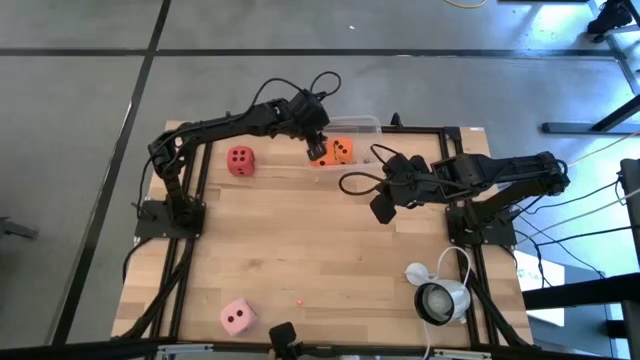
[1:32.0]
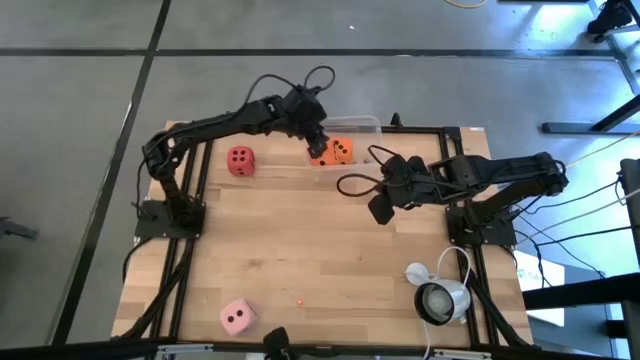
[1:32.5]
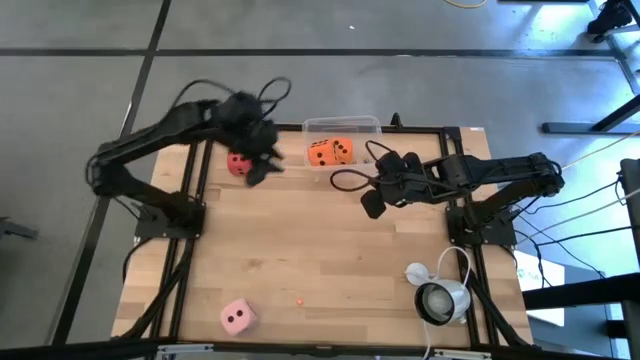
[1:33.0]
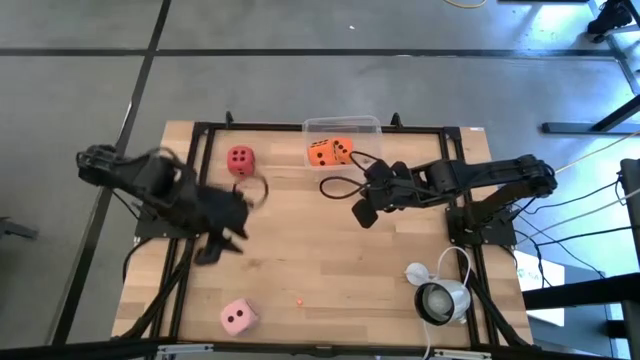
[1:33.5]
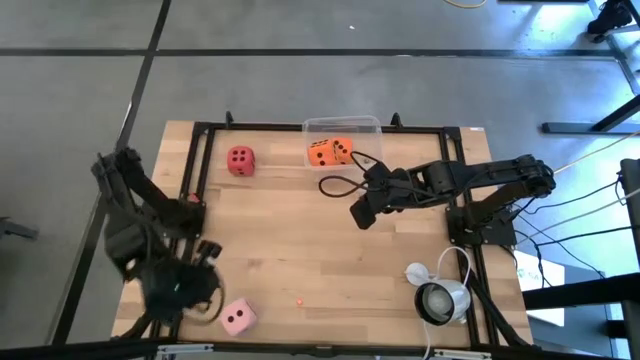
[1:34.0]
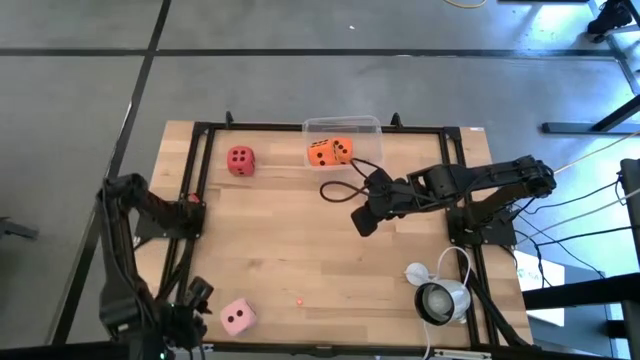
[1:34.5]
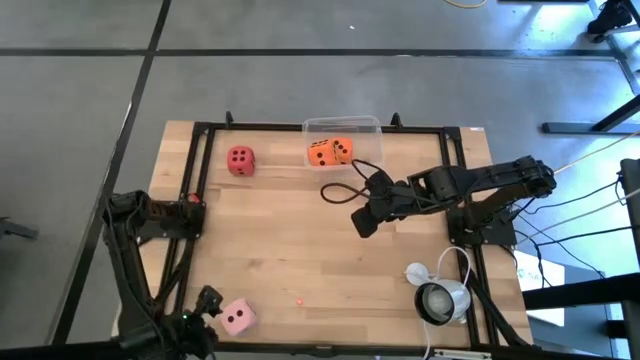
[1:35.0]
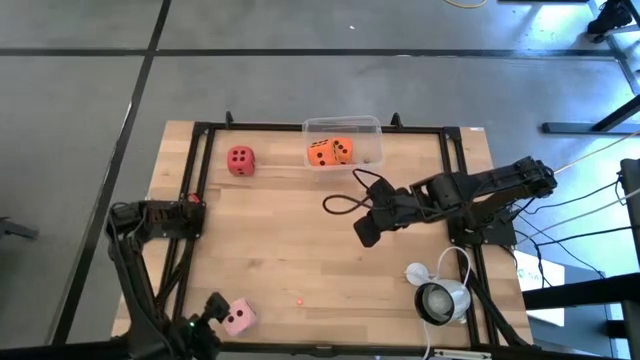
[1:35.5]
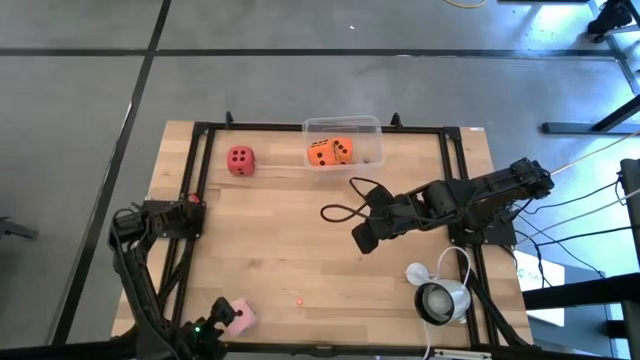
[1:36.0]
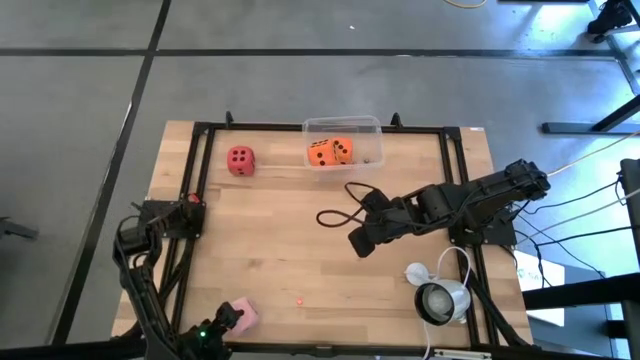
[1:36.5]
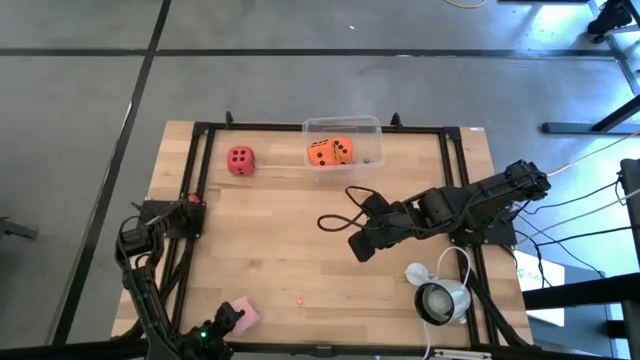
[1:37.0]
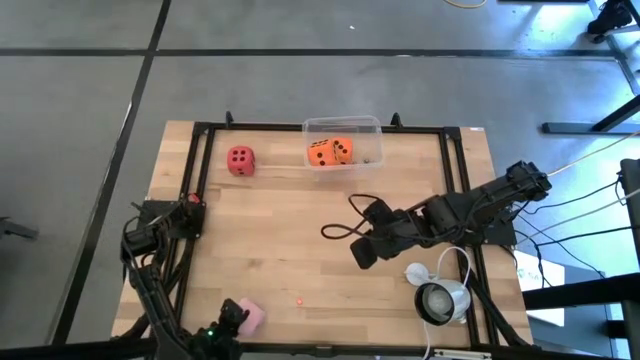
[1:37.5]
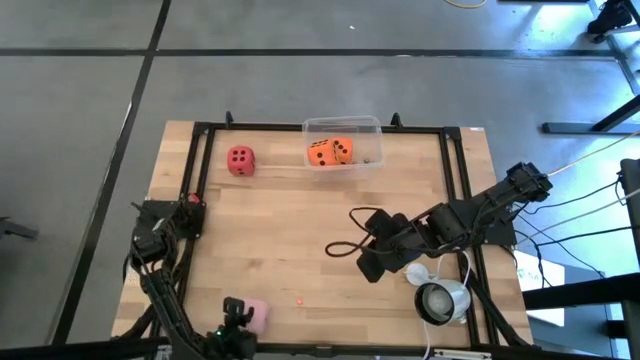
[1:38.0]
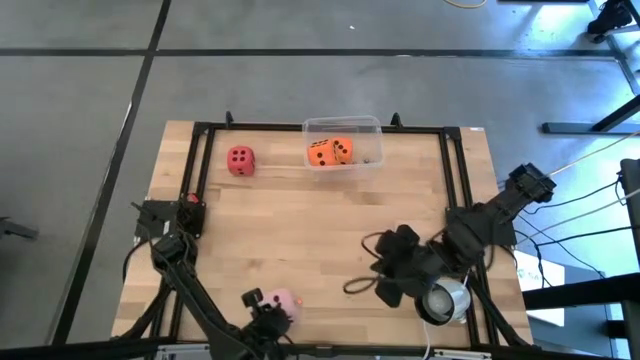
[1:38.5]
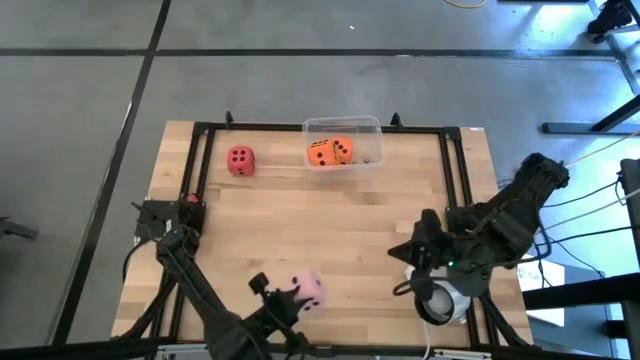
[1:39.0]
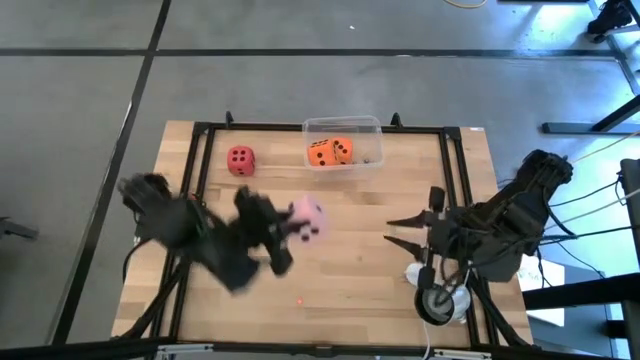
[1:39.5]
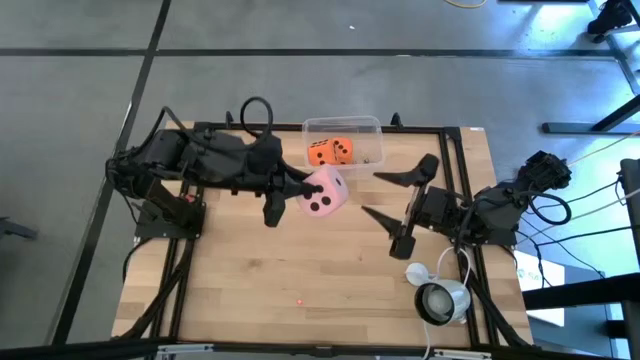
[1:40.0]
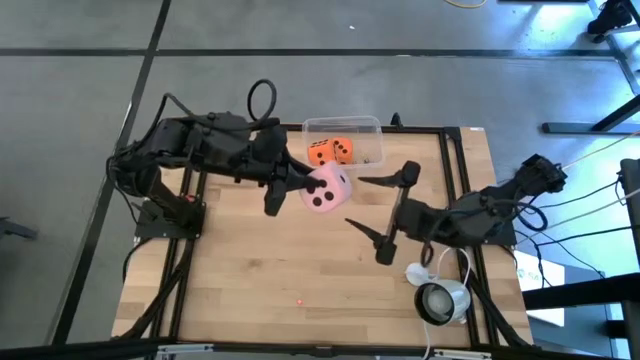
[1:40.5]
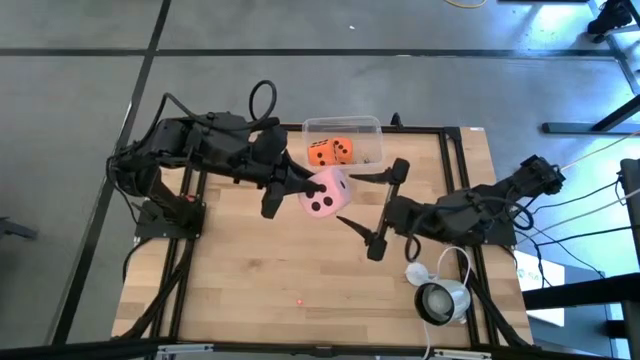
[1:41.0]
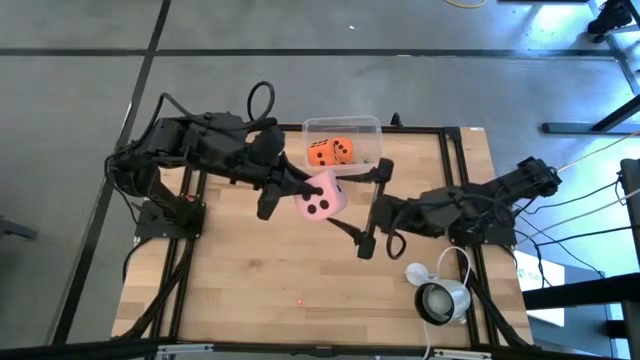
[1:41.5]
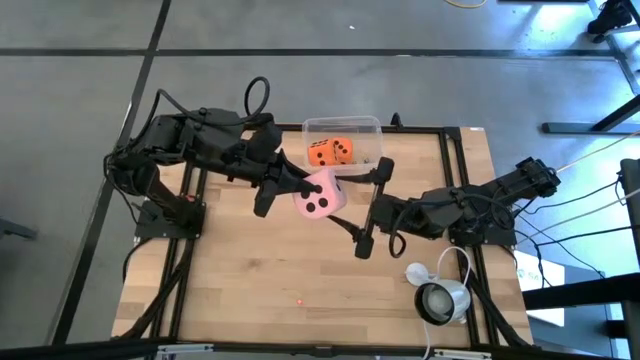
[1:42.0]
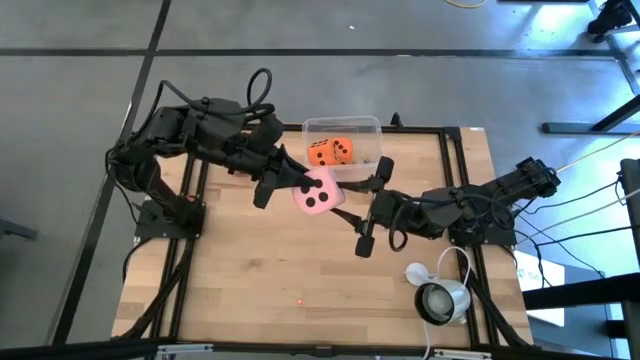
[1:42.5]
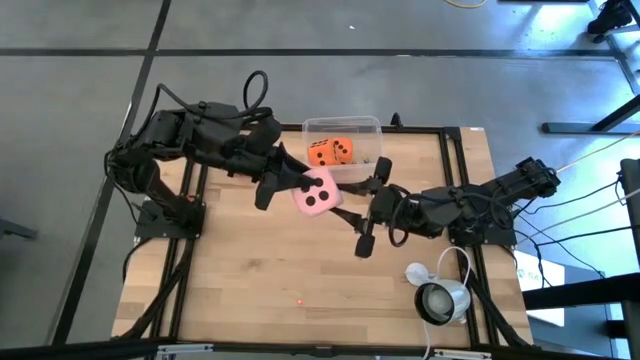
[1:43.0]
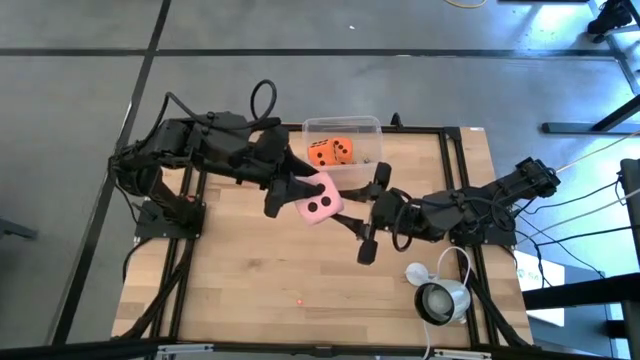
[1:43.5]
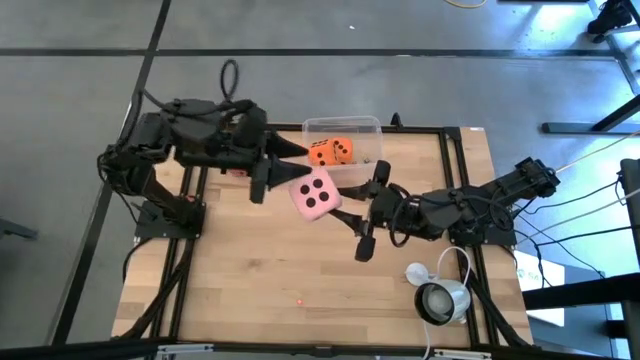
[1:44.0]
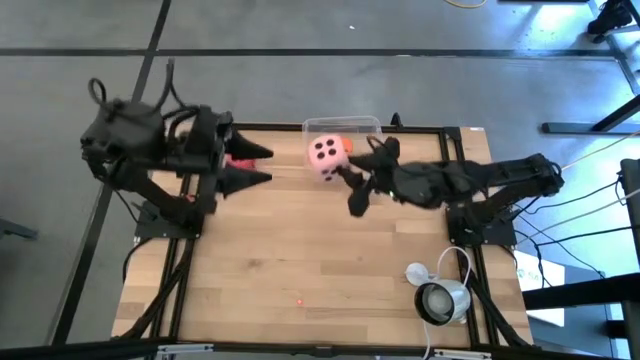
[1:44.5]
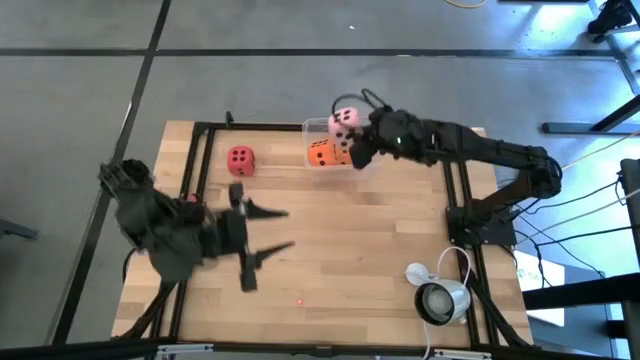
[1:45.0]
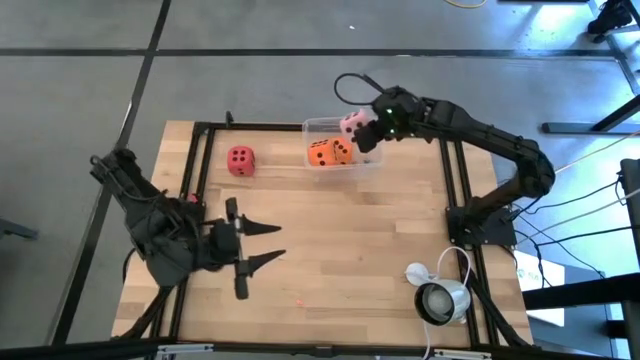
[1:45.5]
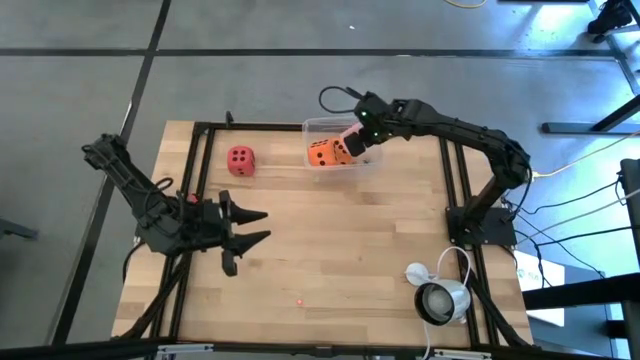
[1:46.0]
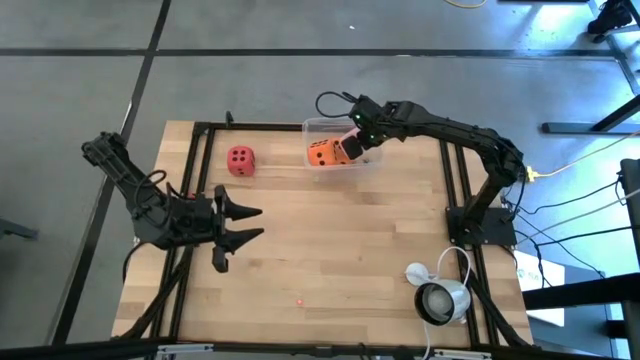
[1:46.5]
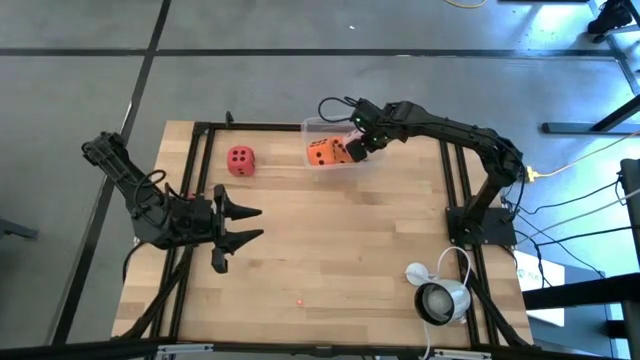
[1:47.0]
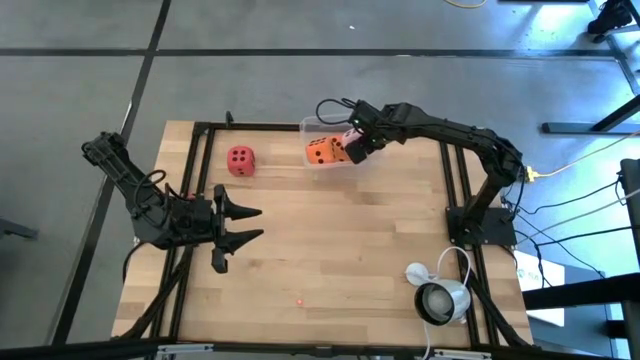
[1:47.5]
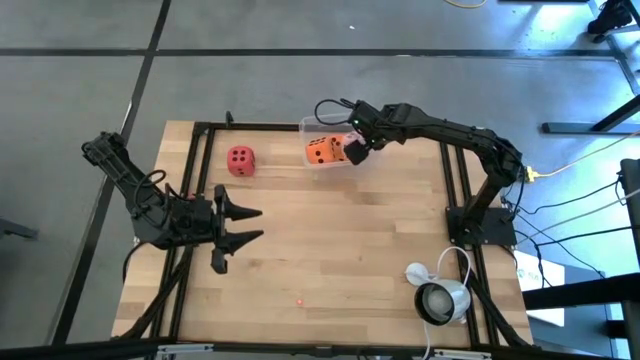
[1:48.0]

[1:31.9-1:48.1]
Task: Pick & Place Dice
Put the large pink dice into the transparent bin

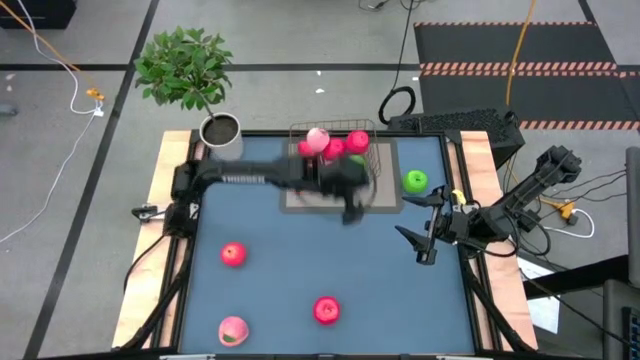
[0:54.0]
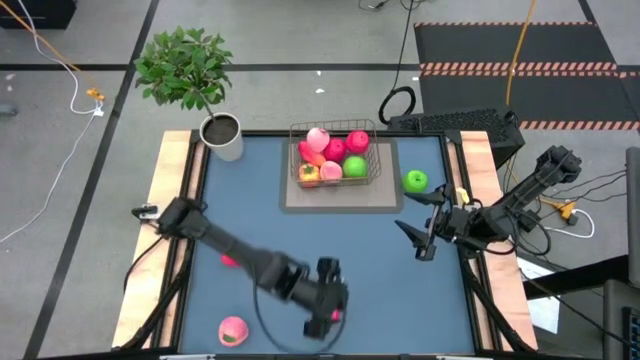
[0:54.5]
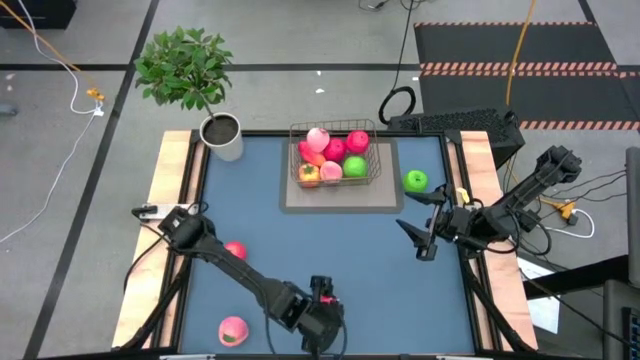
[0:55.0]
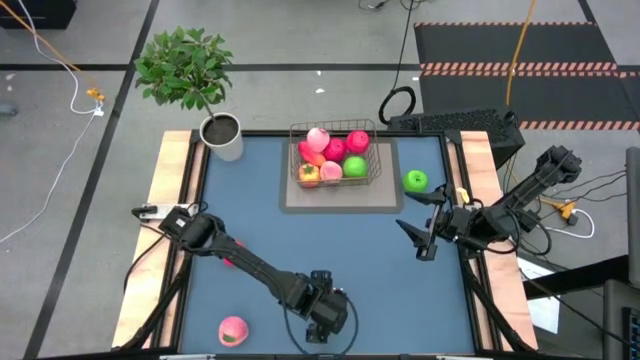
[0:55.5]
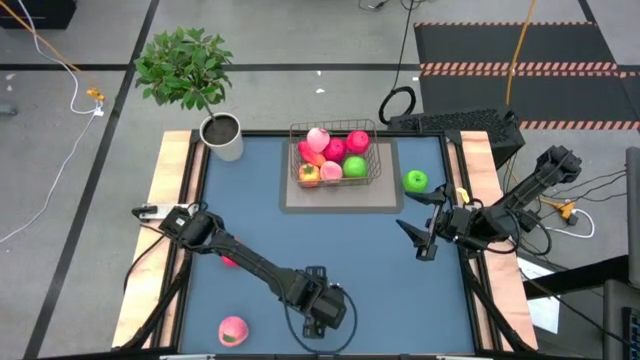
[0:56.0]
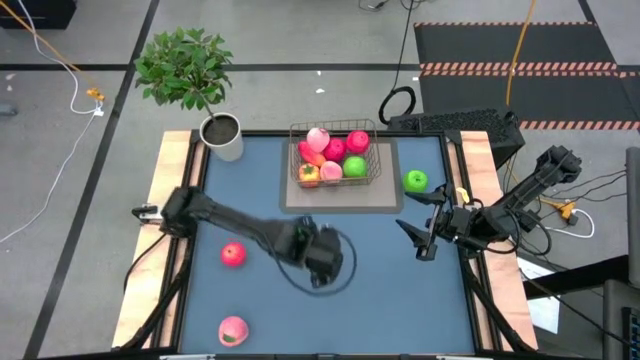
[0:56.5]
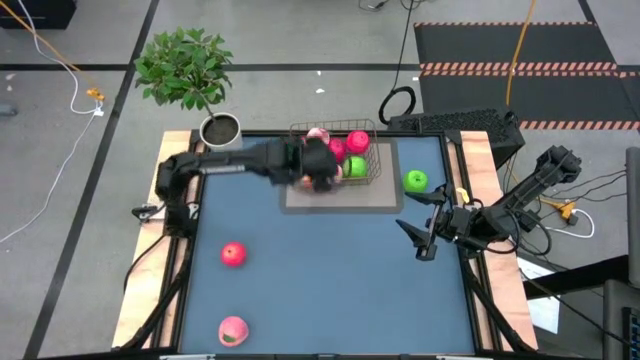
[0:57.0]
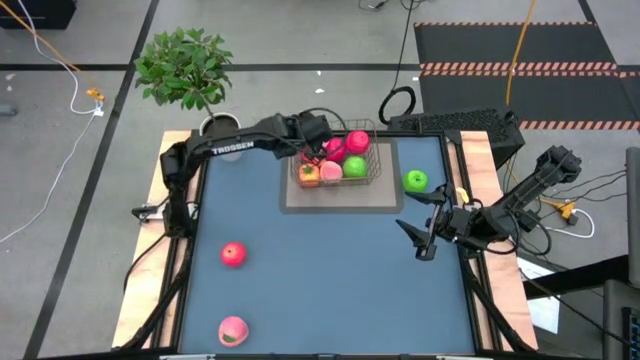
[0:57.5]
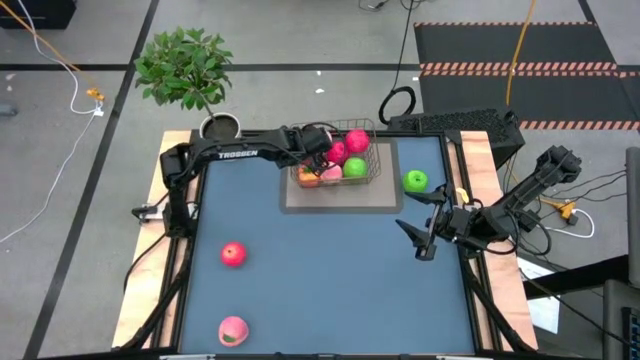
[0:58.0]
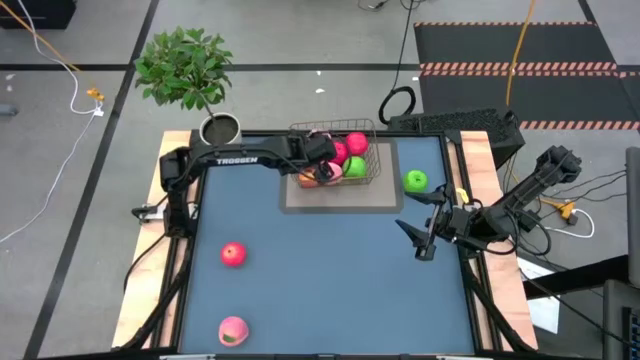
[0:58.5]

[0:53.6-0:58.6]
Task: Build produce basket
Put the red apple into the wire basket
